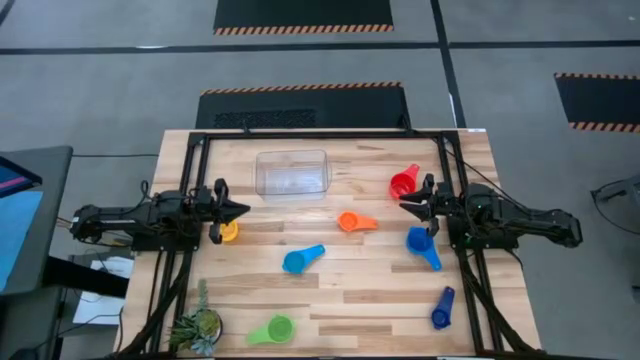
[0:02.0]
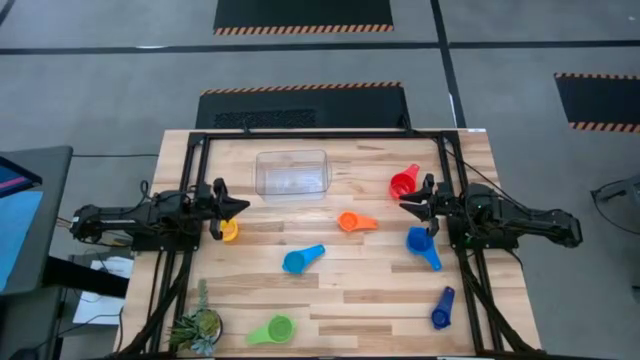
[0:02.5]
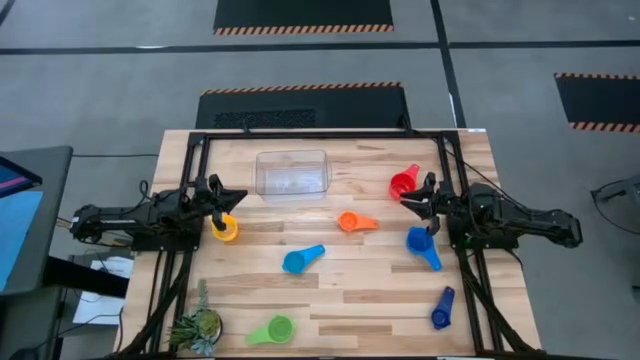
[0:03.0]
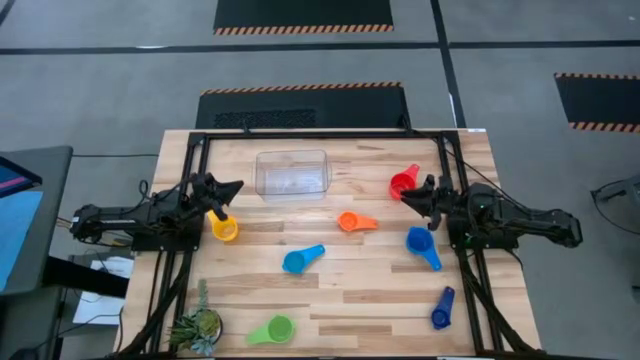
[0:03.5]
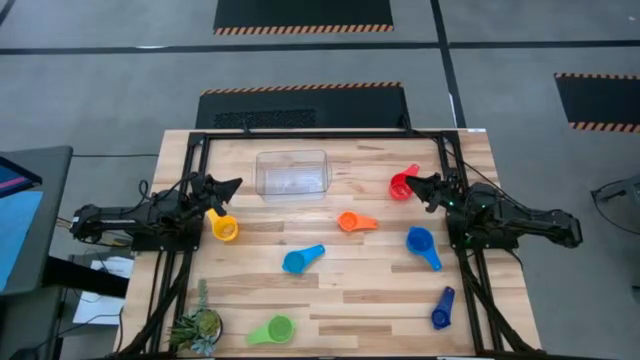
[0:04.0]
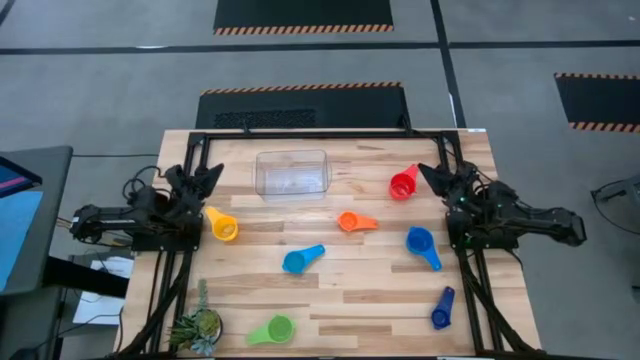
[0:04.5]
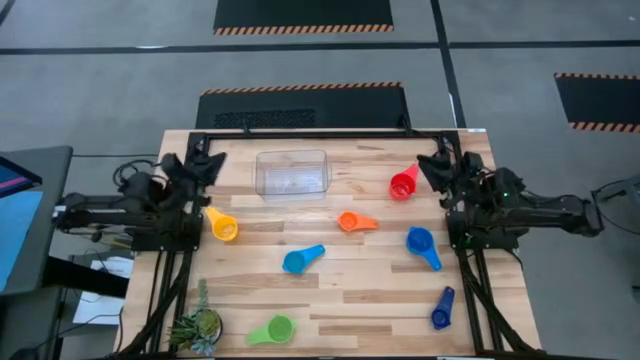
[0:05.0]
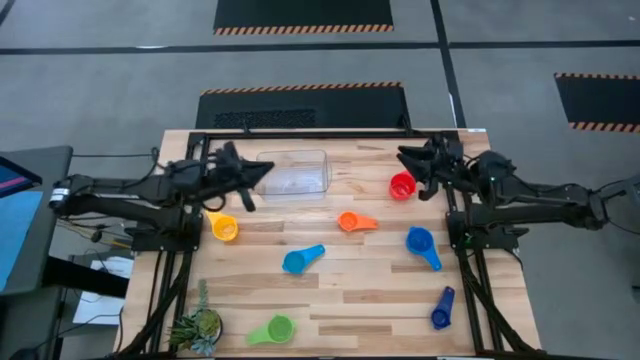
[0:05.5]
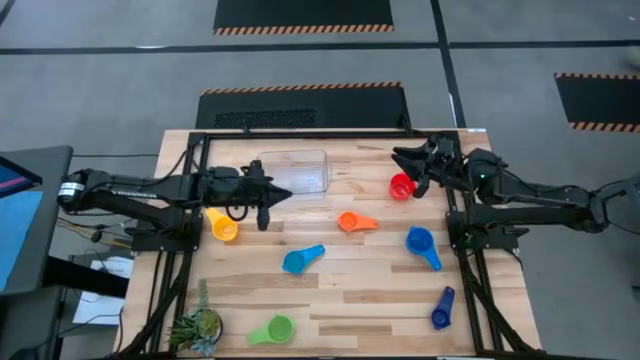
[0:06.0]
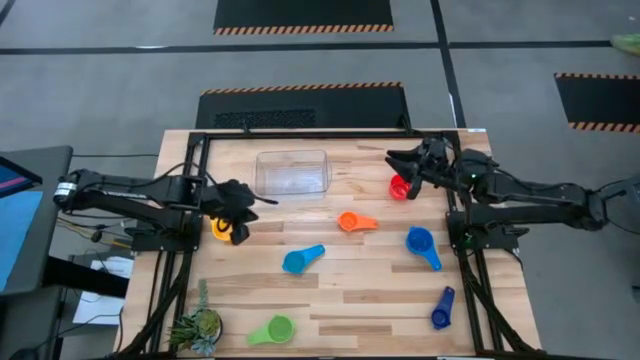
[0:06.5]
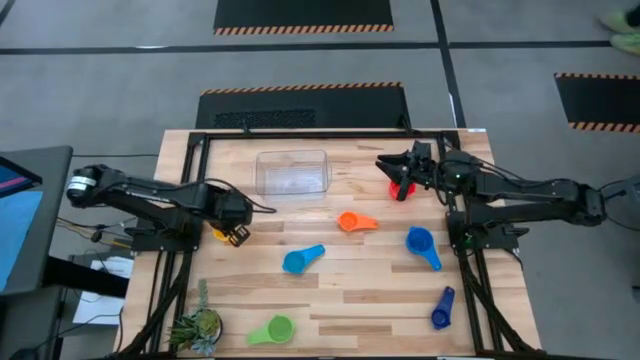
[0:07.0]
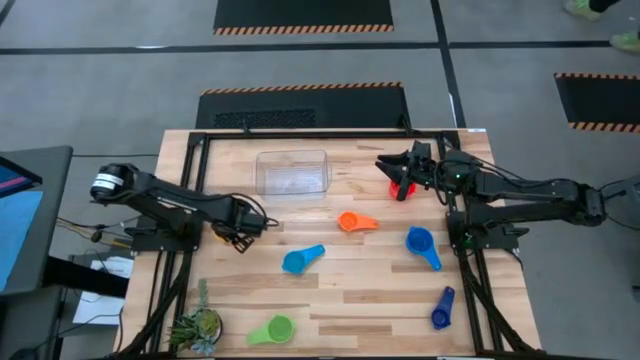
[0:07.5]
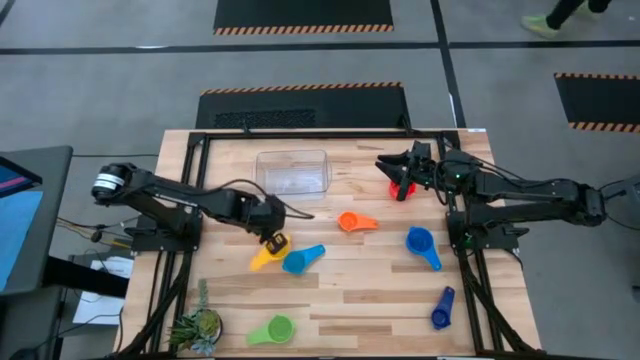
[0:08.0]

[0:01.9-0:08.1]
Task: Nest measuring cups in basket
Adjust the yellow measuring cup on the table

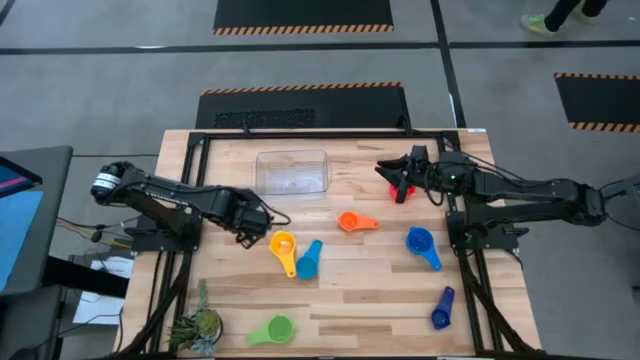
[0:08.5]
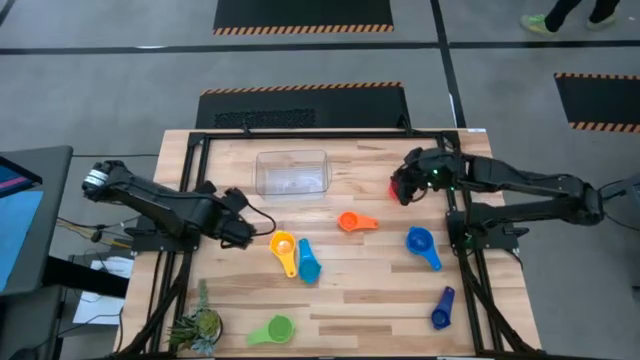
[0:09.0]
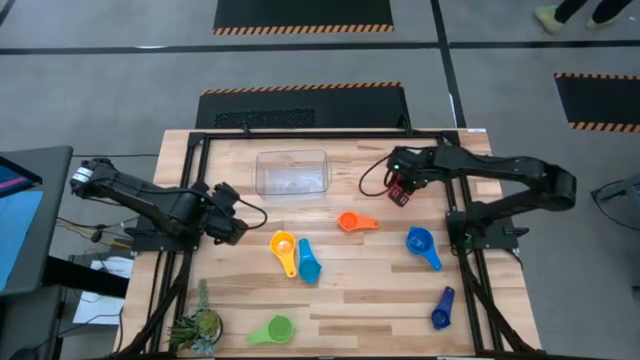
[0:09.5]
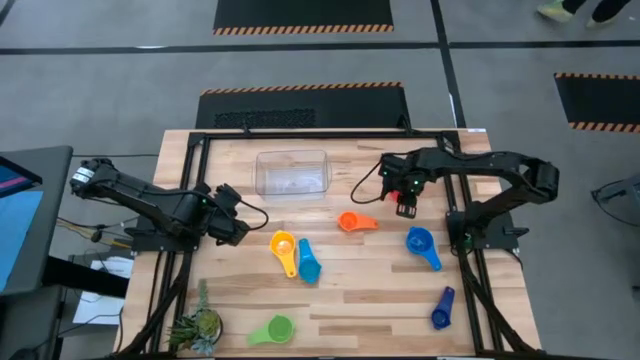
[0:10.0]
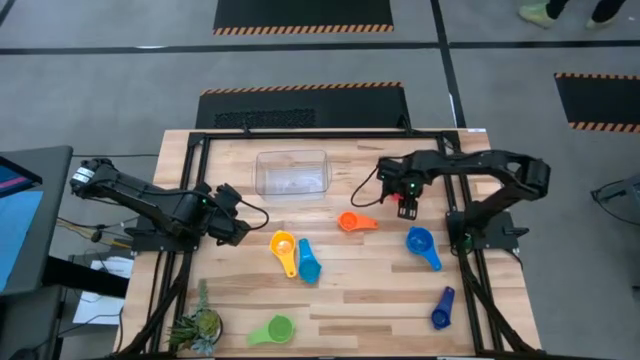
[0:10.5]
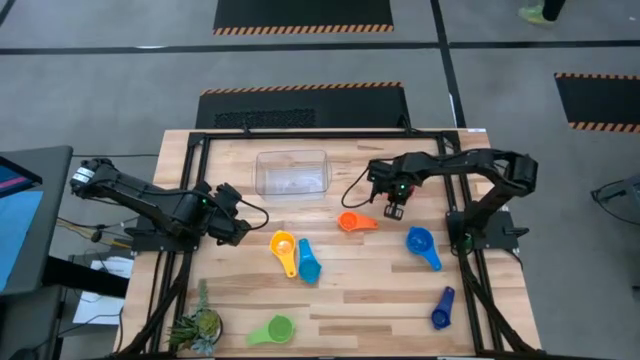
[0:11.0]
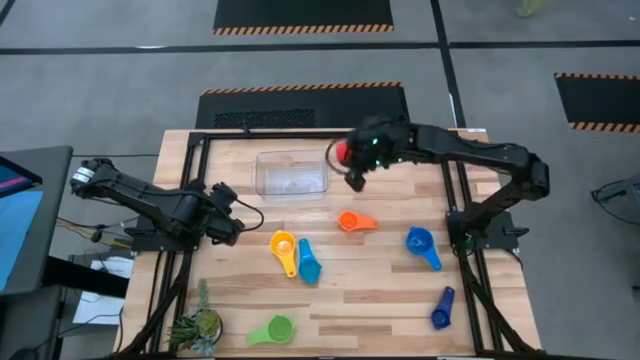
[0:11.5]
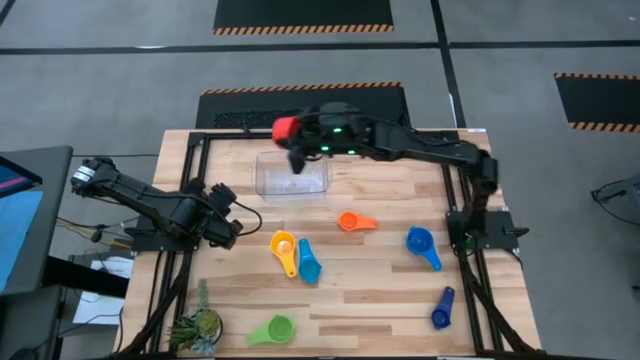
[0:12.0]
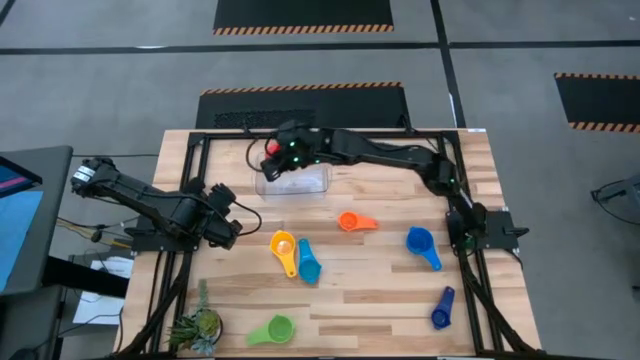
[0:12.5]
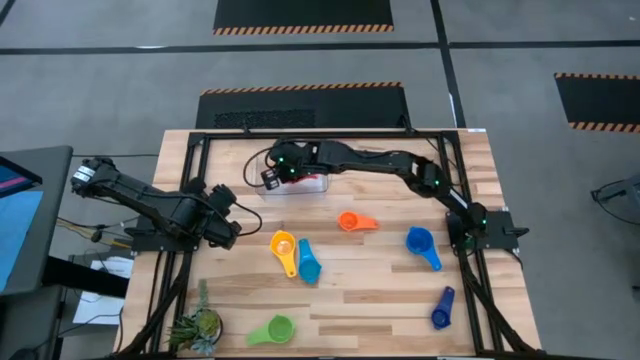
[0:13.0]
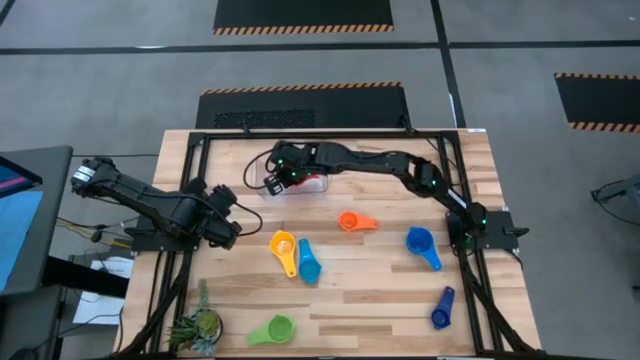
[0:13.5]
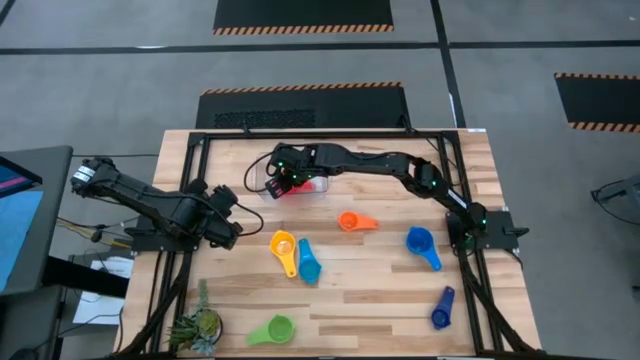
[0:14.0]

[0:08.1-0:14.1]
Put the red measuring cup into the transparent bin

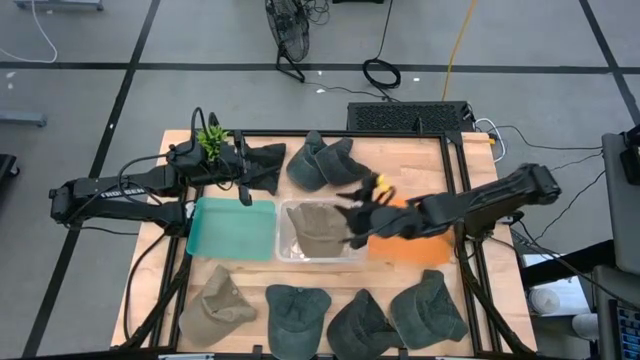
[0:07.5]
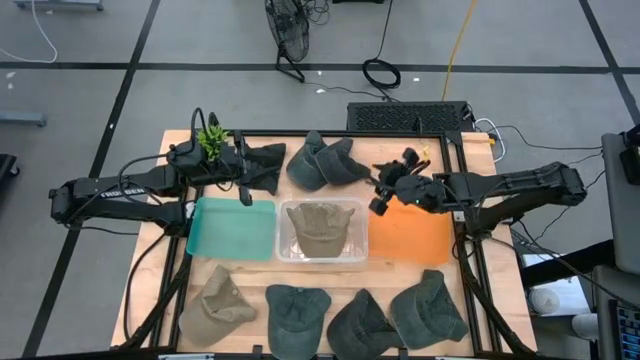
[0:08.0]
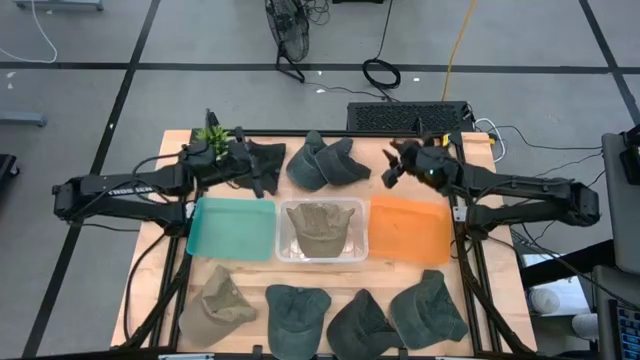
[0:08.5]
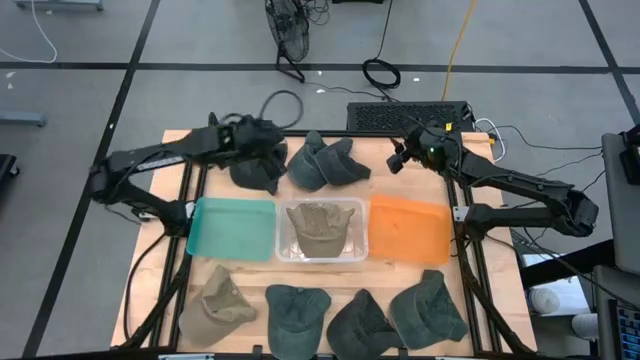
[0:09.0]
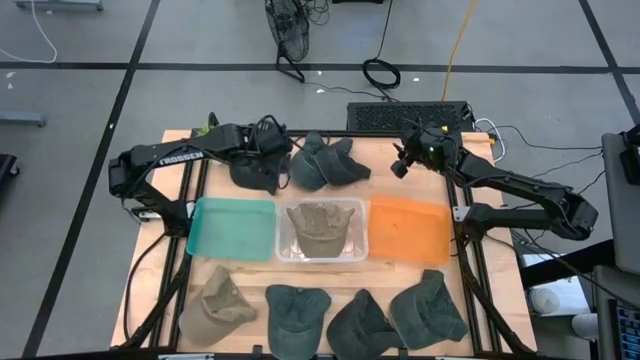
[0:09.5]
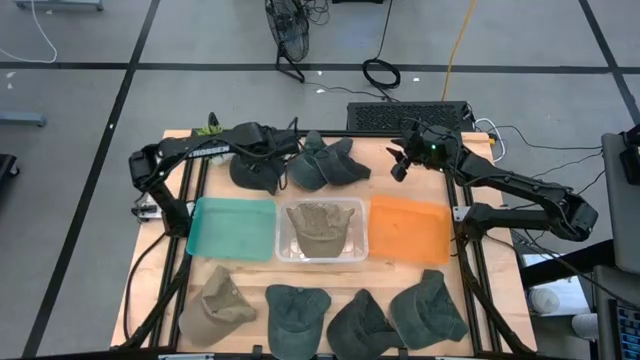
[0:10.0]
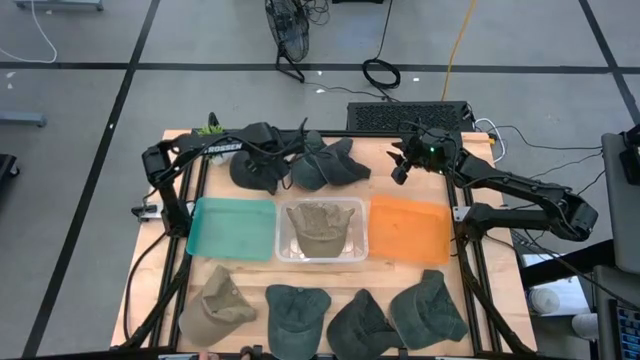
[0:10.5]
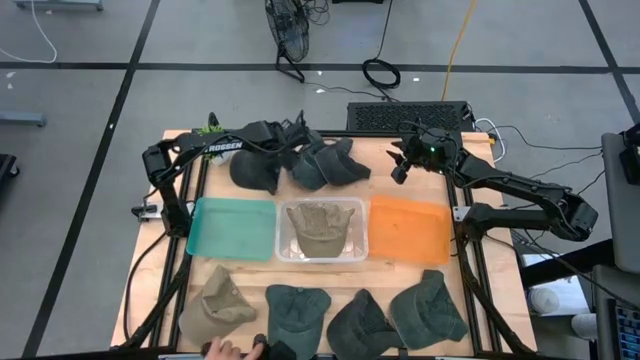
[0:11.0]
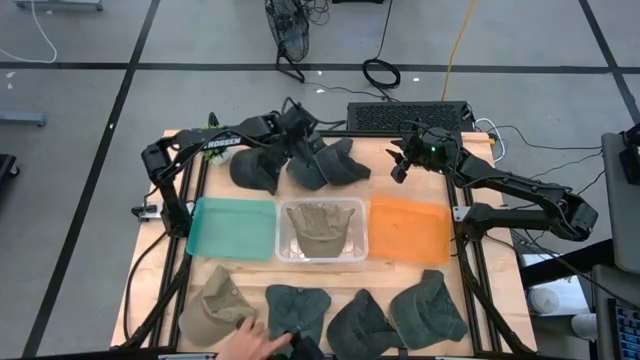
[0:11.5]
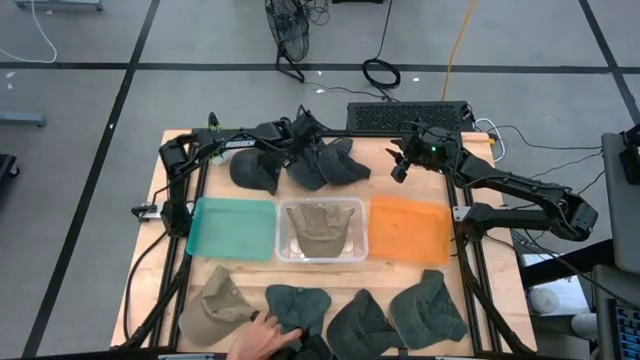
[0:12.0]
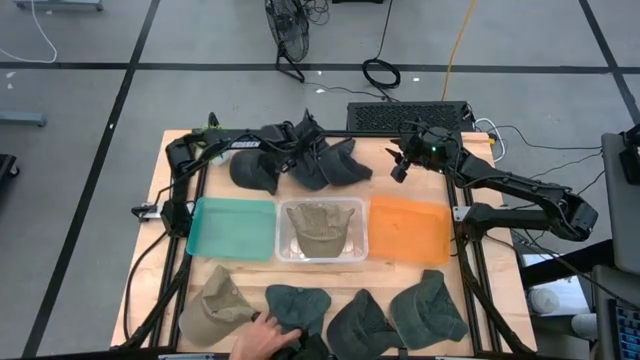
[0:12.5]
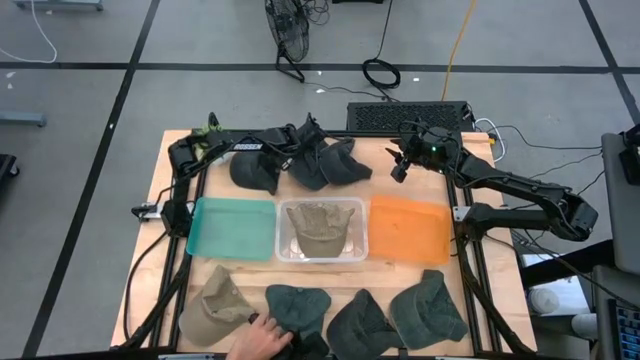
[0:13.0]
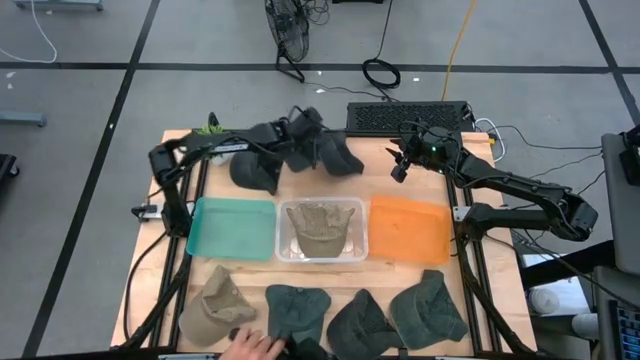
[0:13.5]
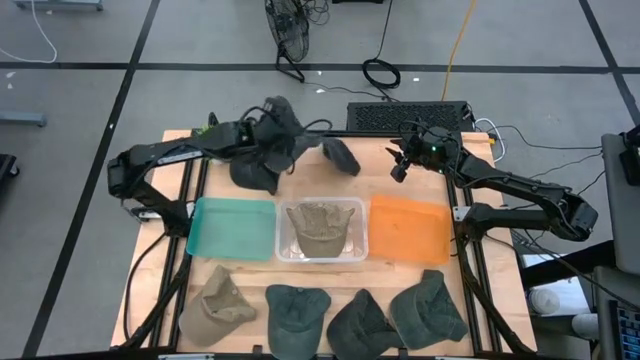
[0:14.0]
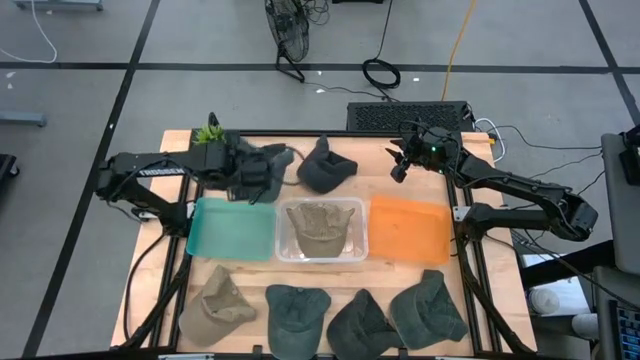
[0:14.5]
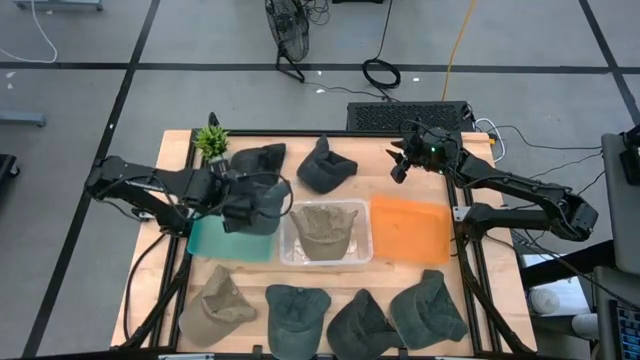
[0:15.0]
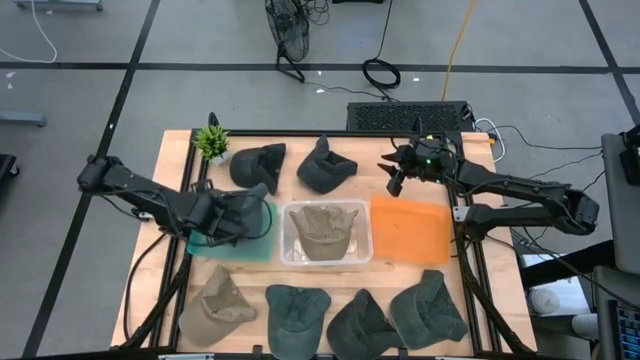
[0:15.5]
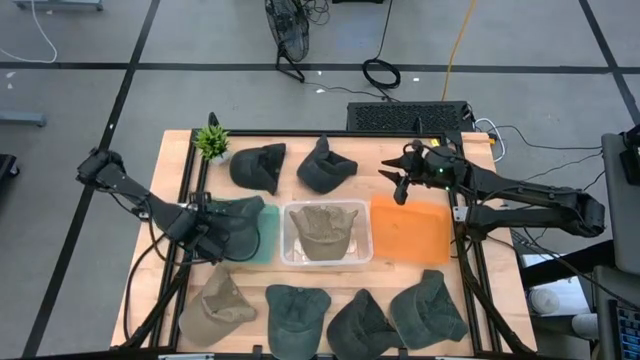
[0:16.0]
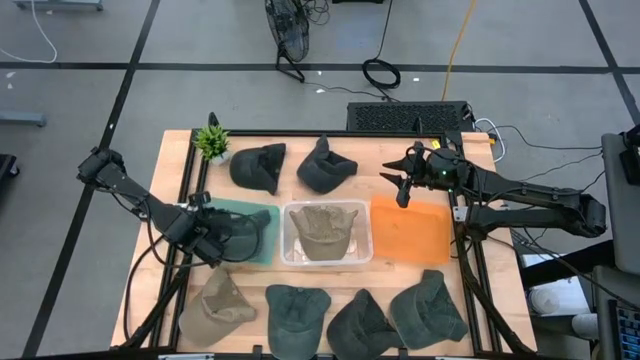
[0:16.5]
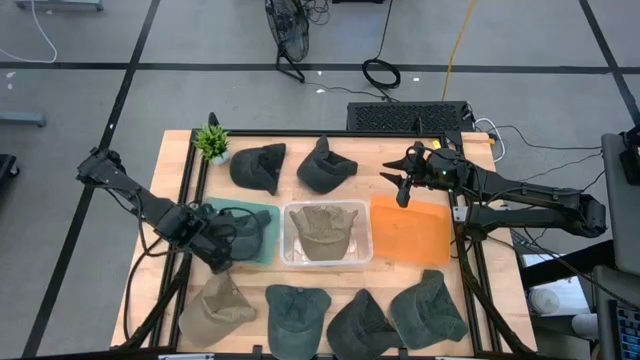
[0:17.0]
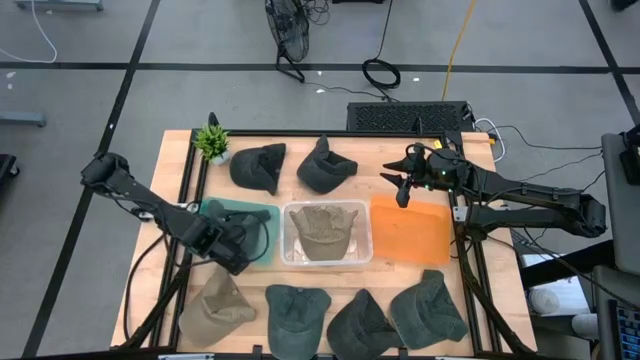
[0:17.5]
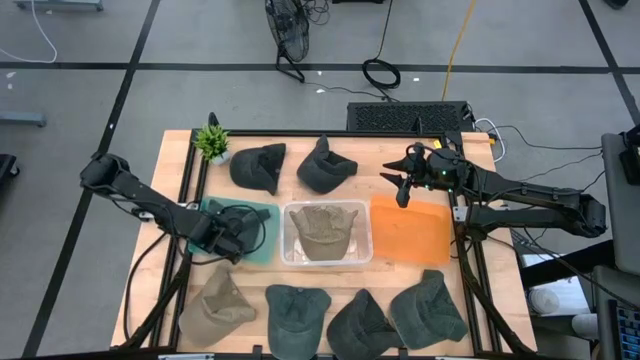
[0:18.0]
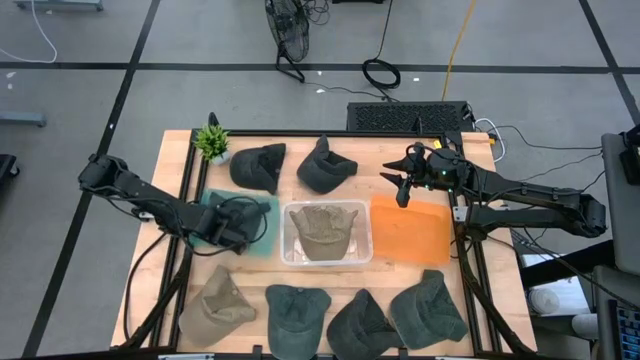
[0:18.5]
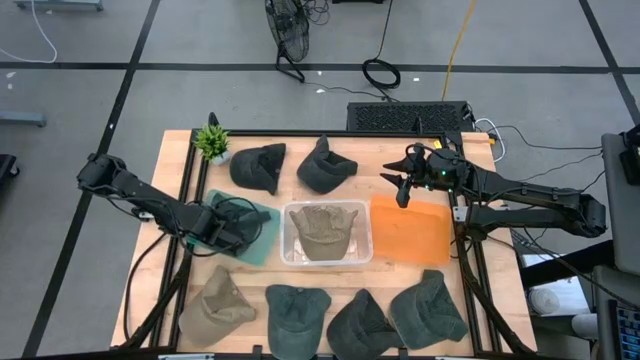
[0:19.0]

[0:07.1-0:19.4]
Task: Pick & Place hat
Put the top green cap into the green bin
